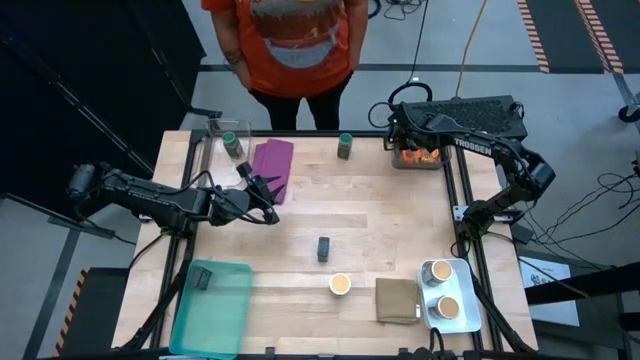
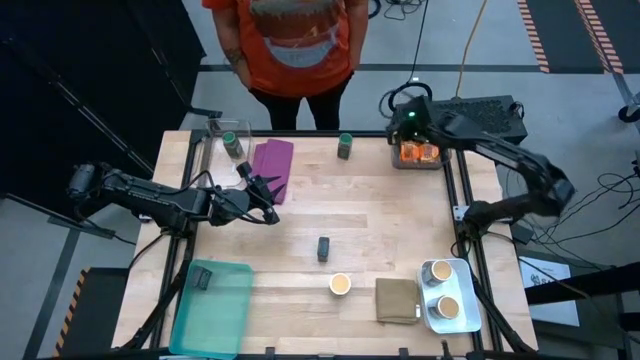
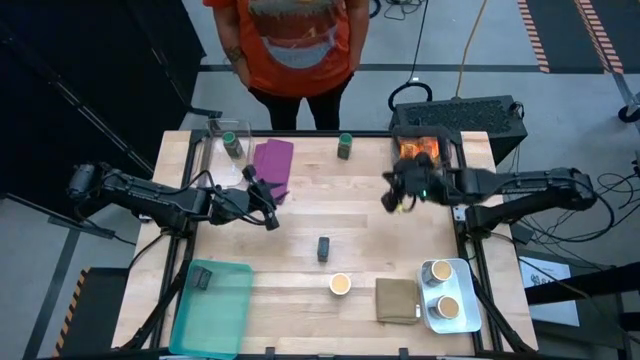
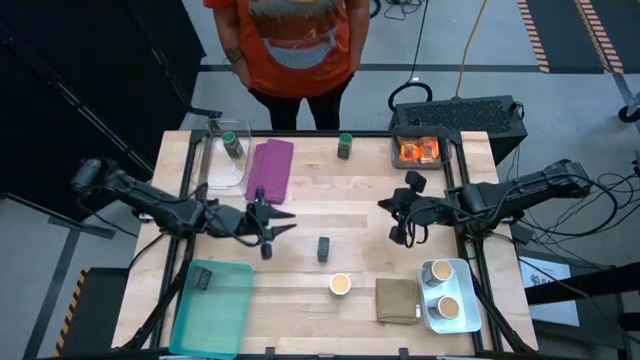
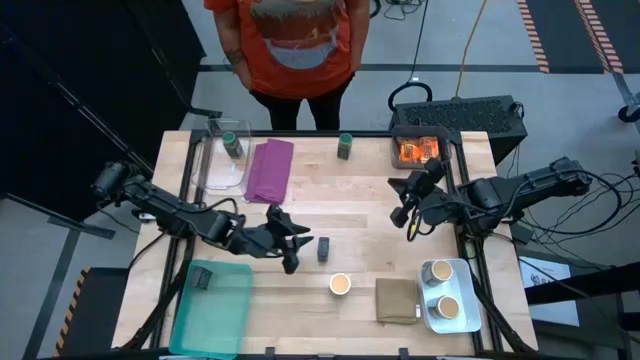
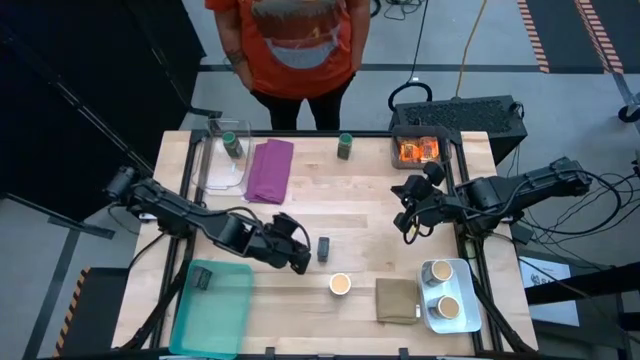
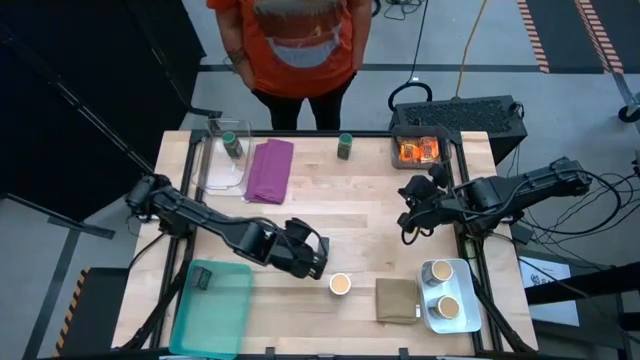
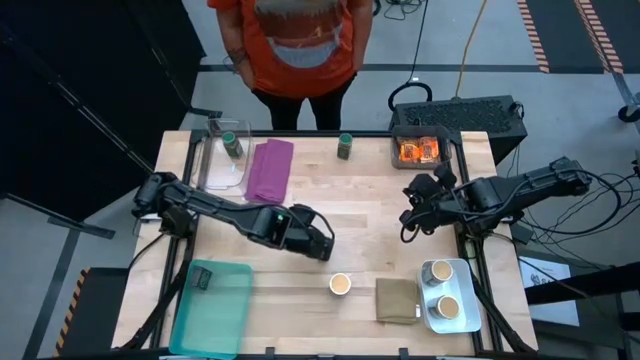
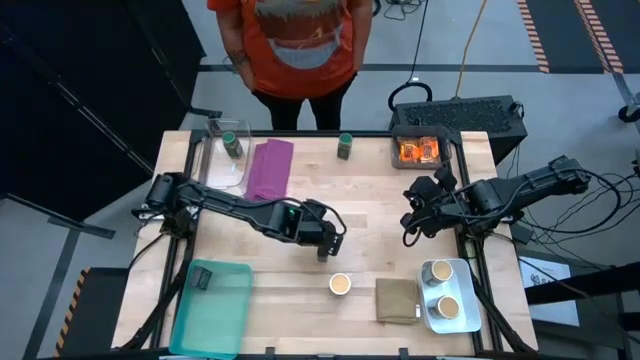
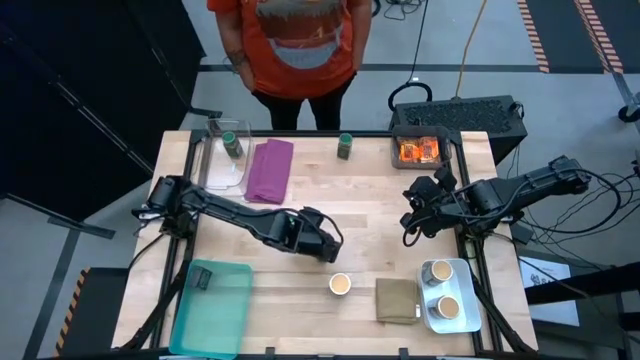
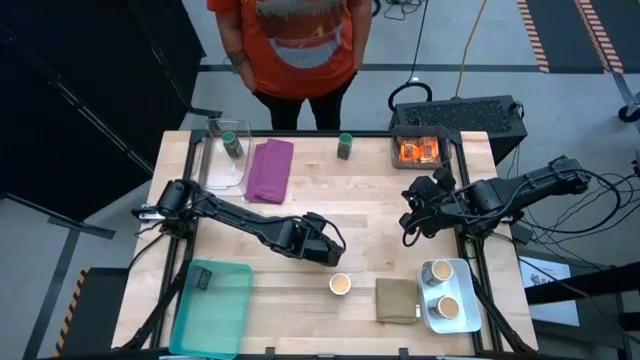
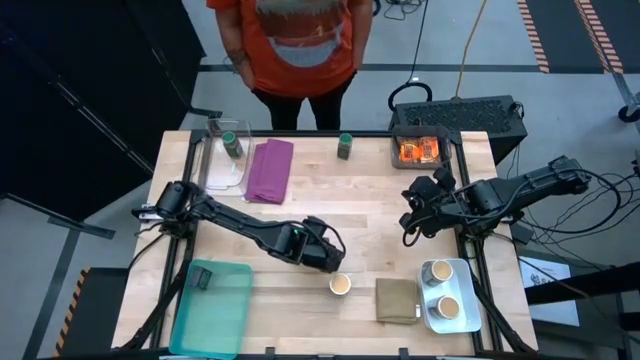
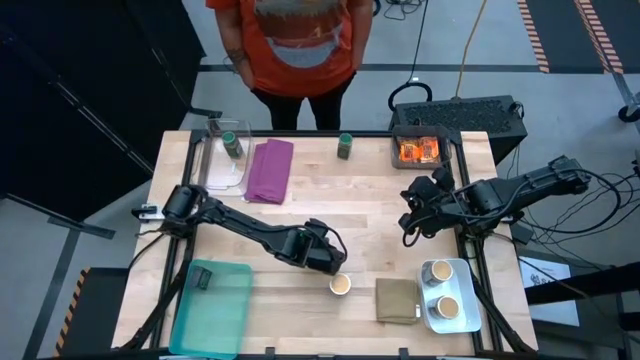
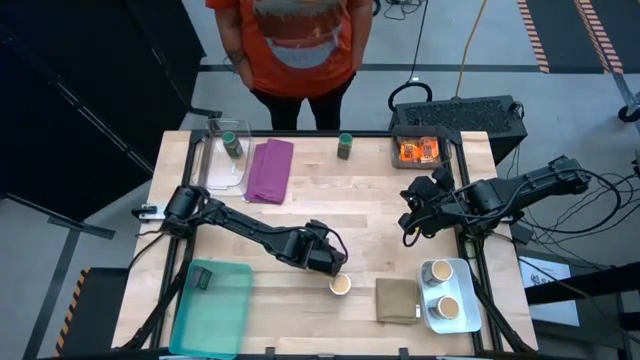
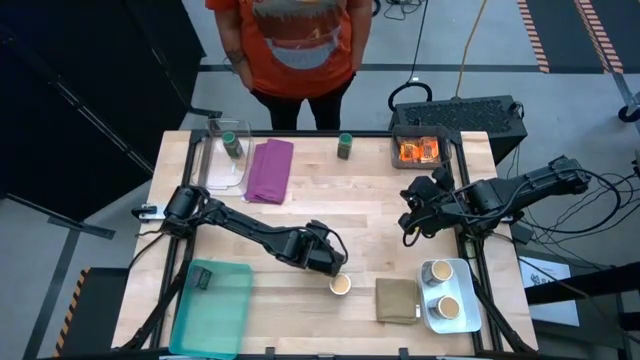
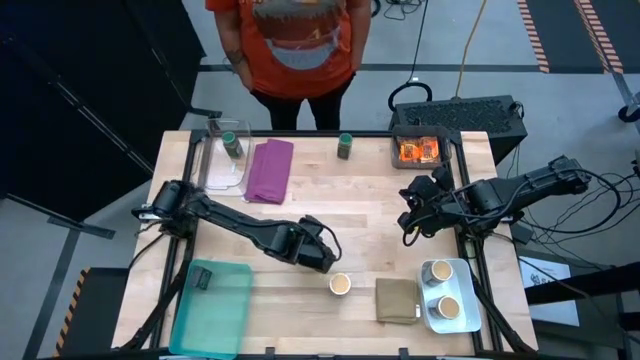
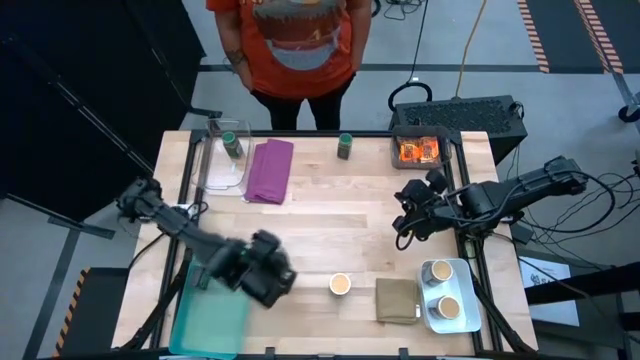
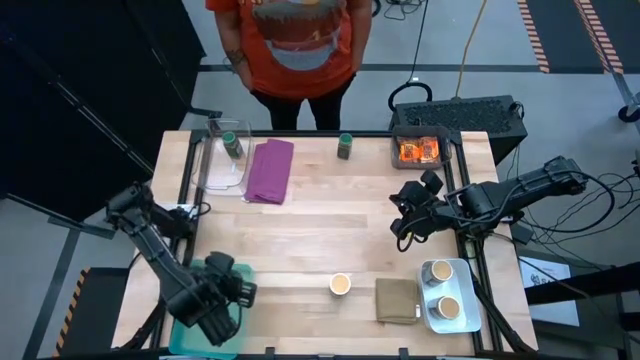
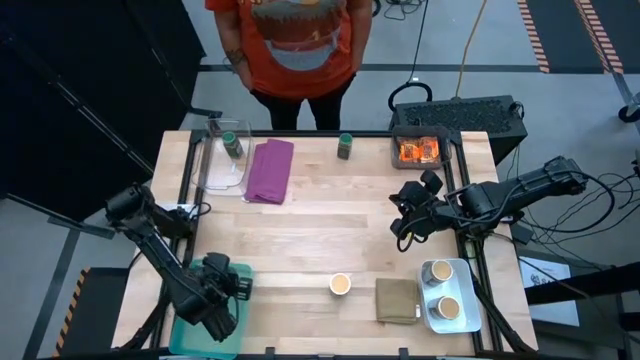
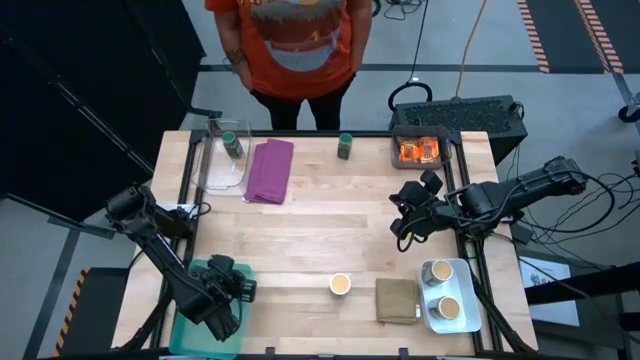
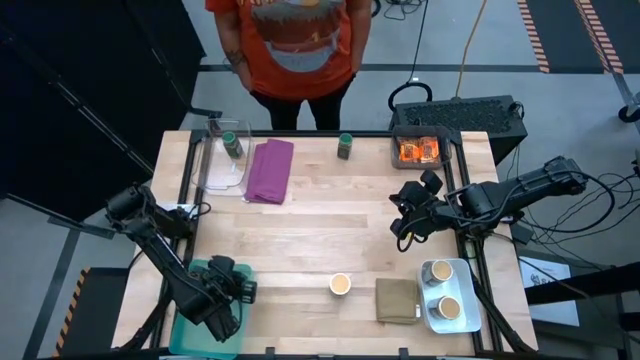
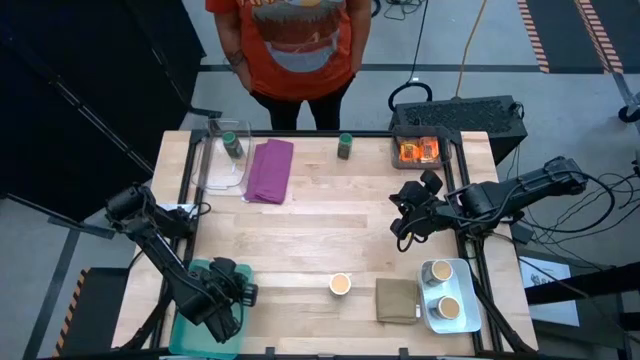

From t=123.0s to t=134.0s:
Task: Sort spices by type
Put the black seasoning can into the light blue bin

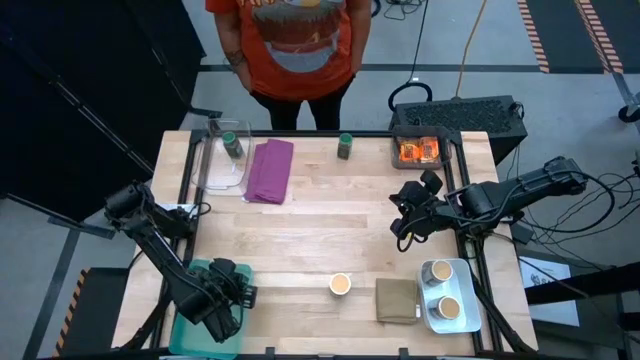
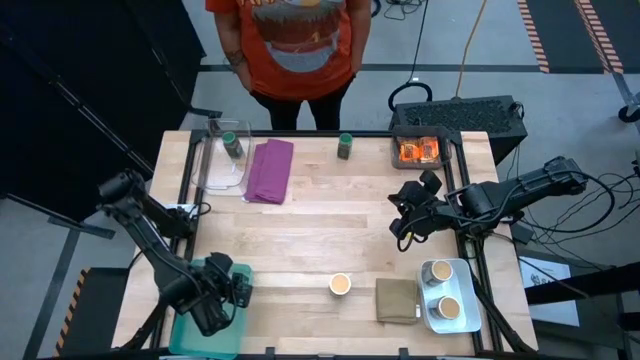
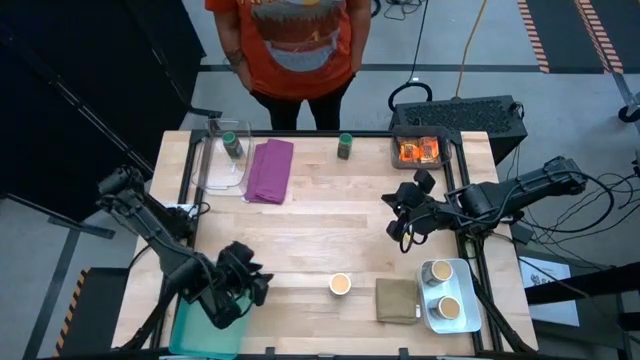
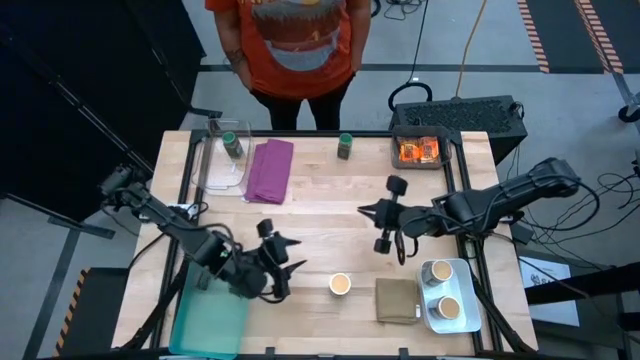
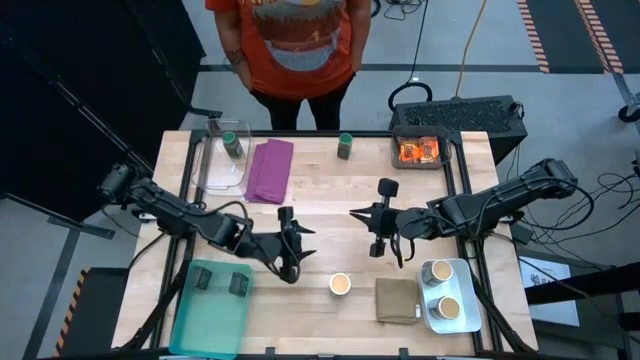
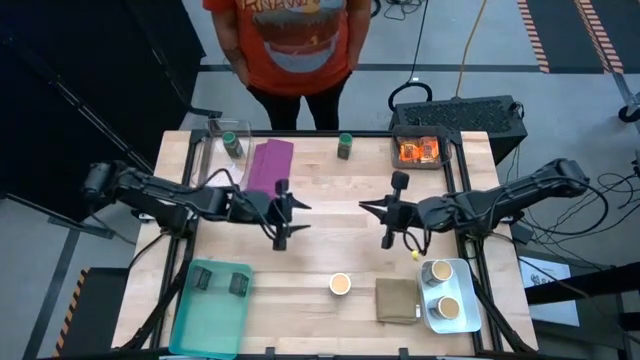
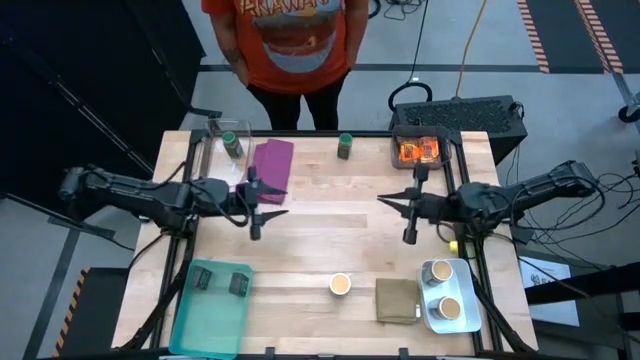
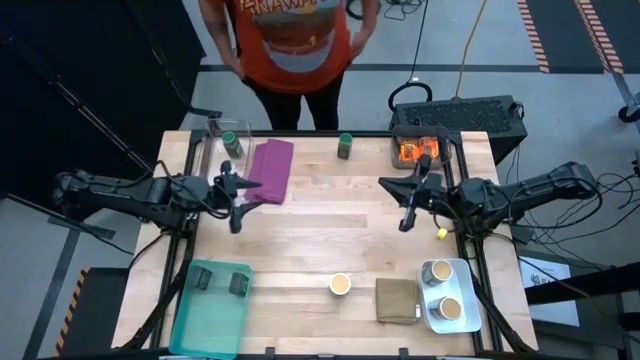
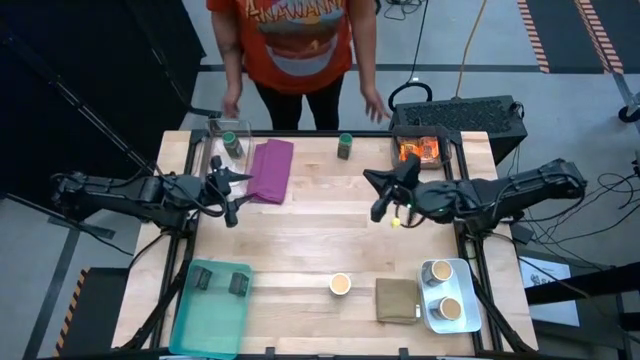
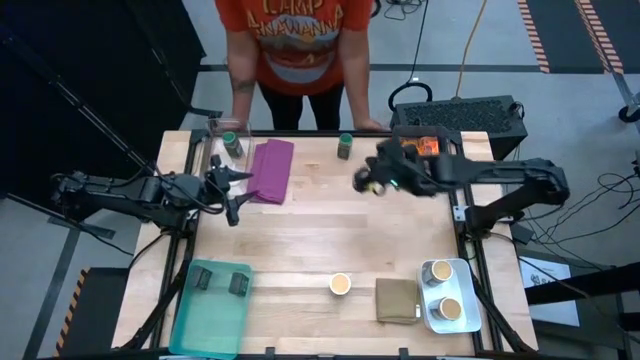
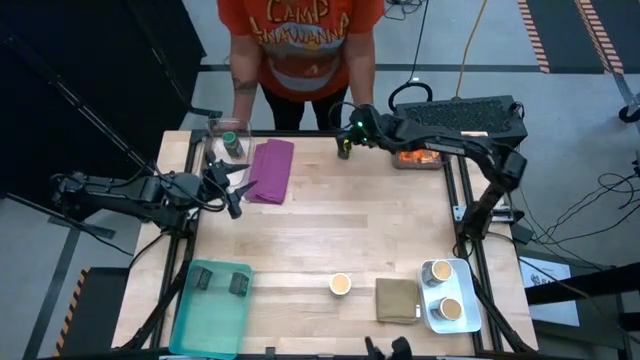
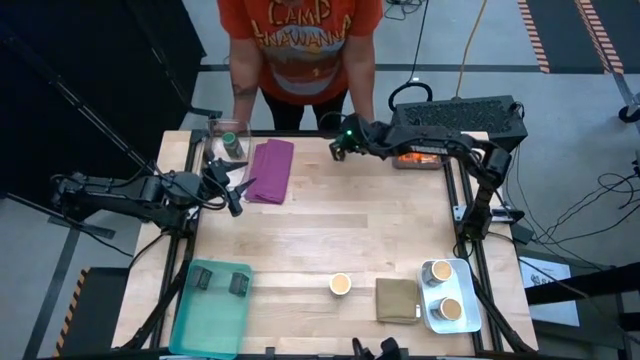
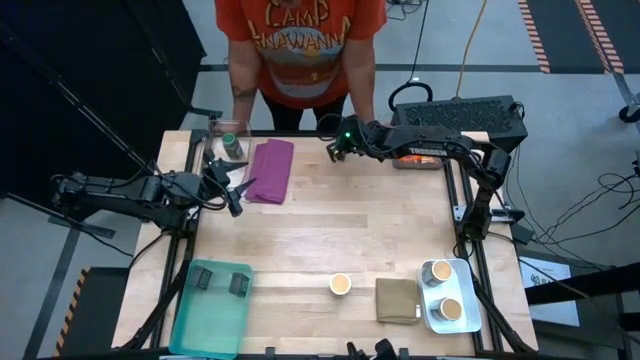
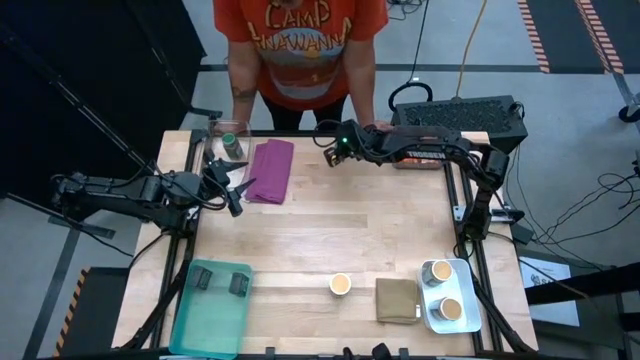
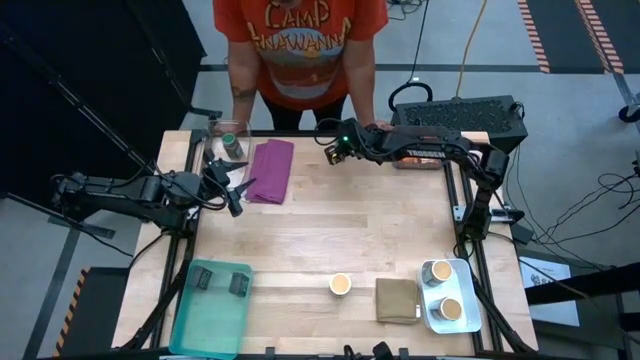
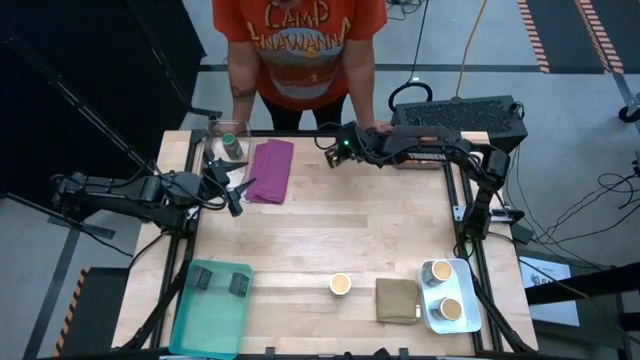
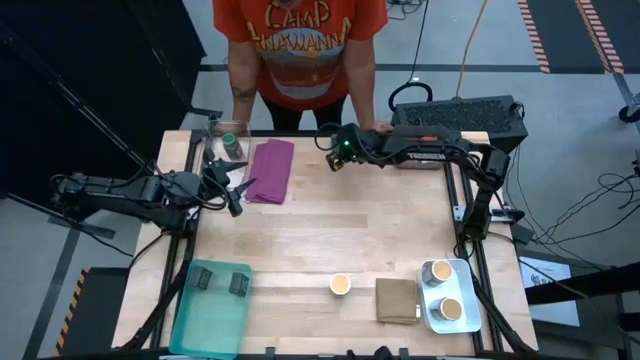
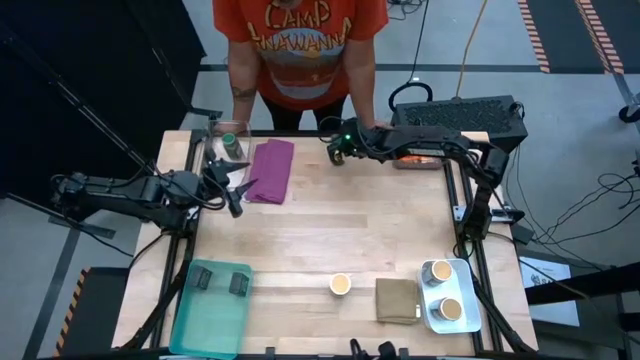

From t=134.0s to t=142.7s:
Put the green seasoning bottle into the transparent bin

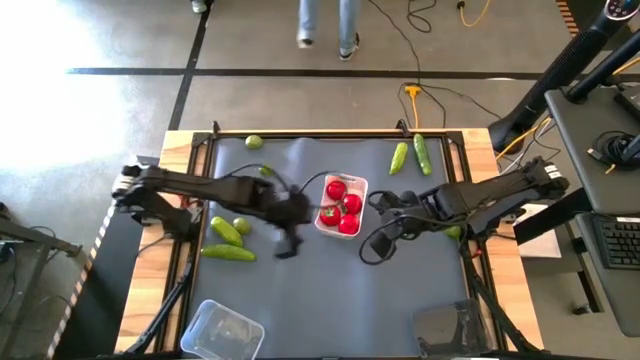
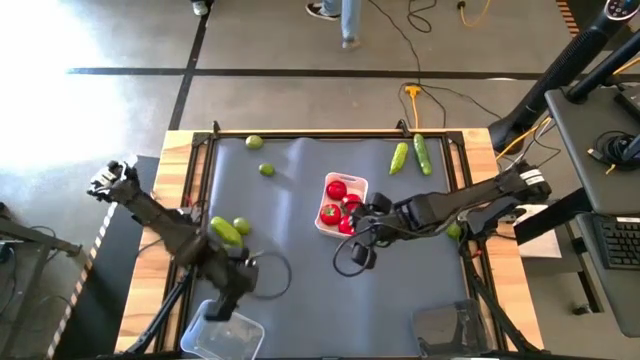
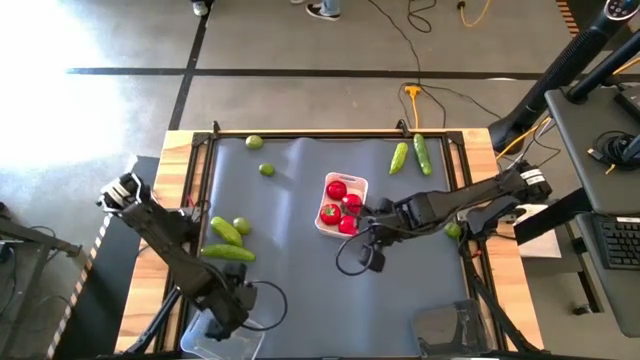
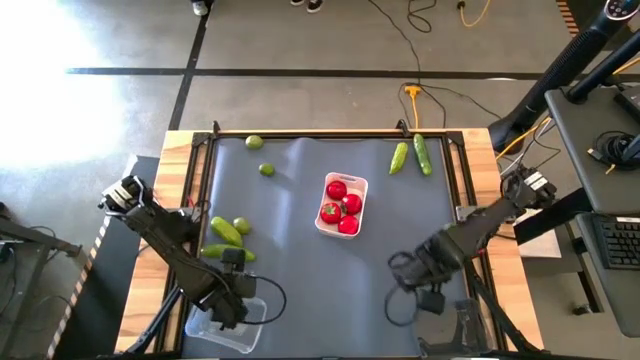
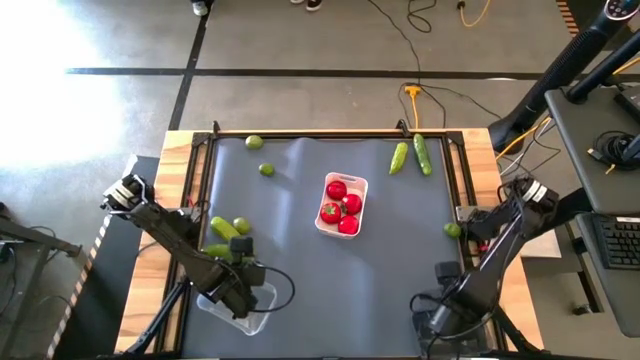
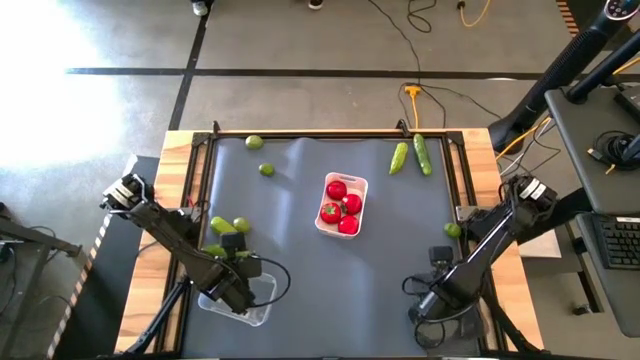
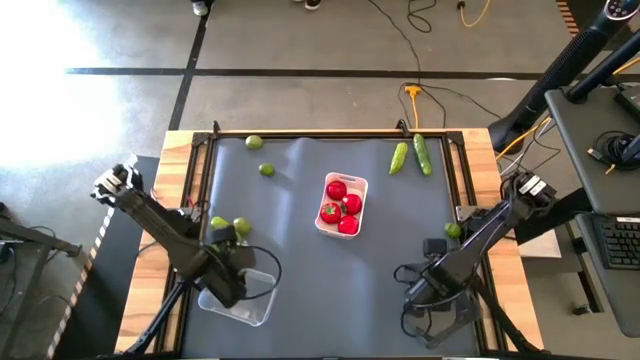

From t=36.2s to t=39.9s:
Task: Sort produce into baskets
Adjust the white transparent bin and black transparent bin
